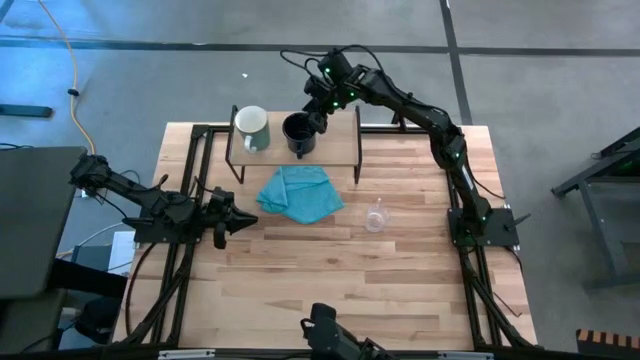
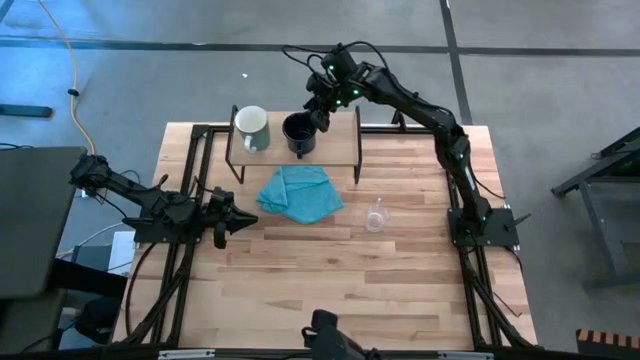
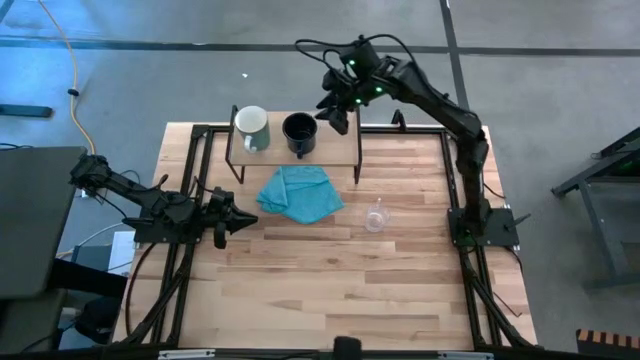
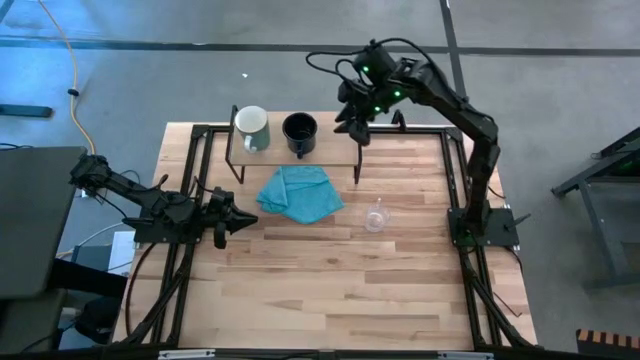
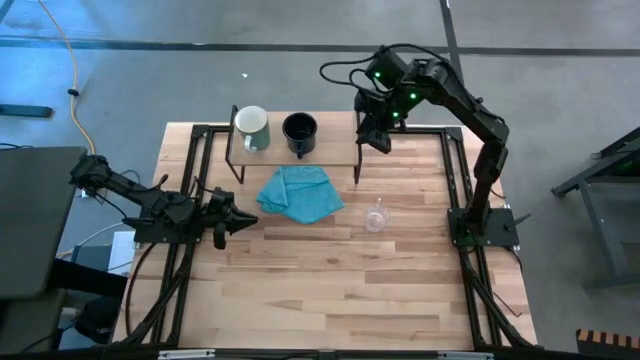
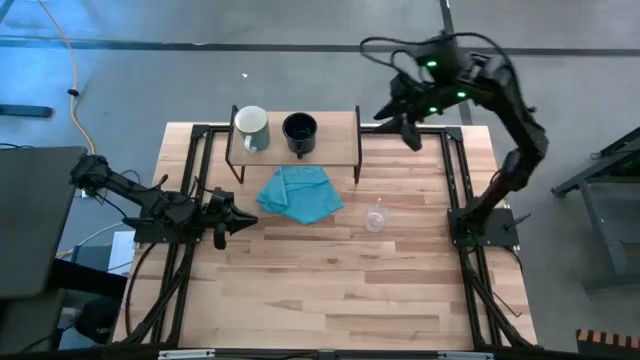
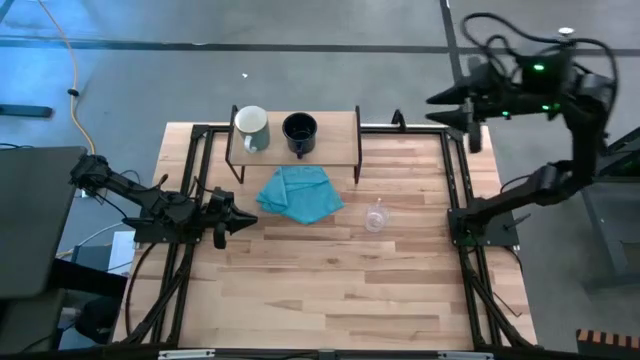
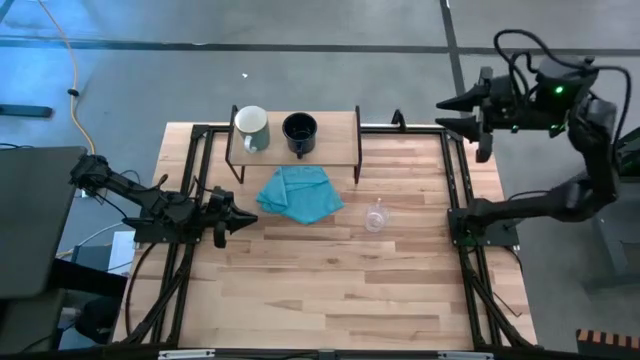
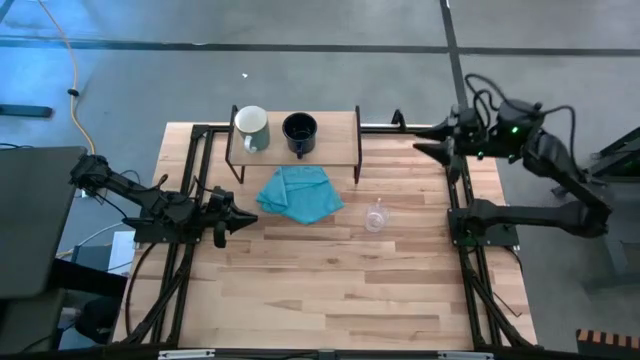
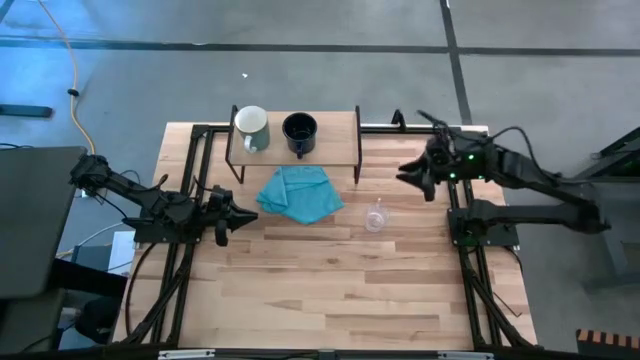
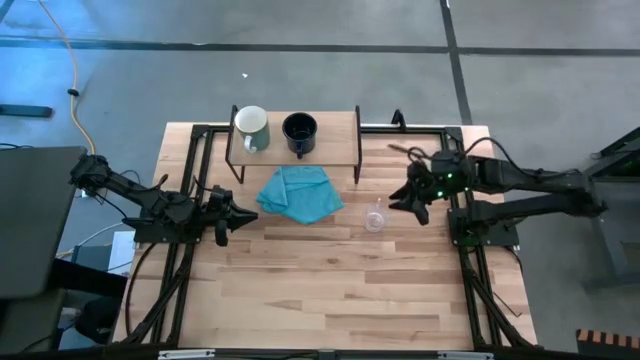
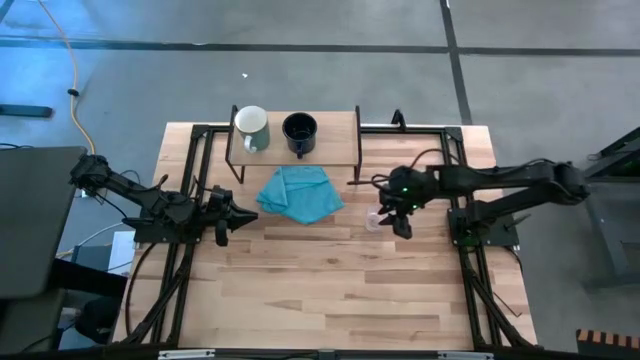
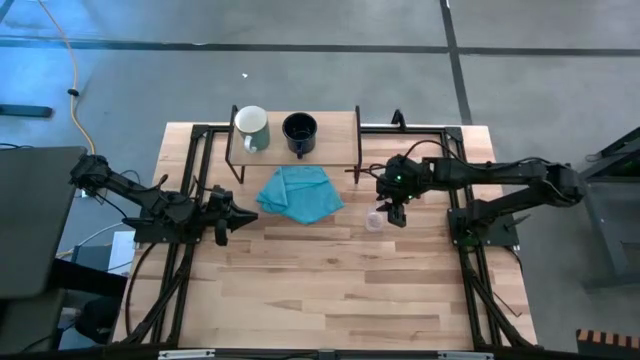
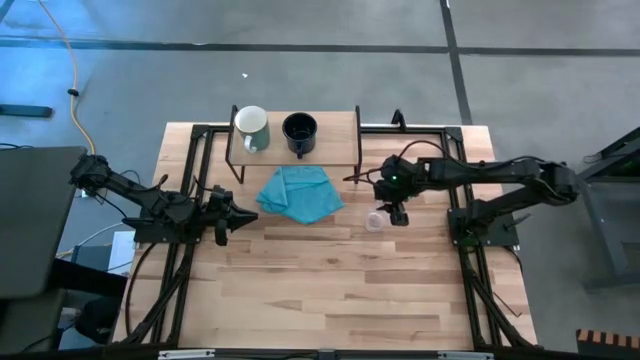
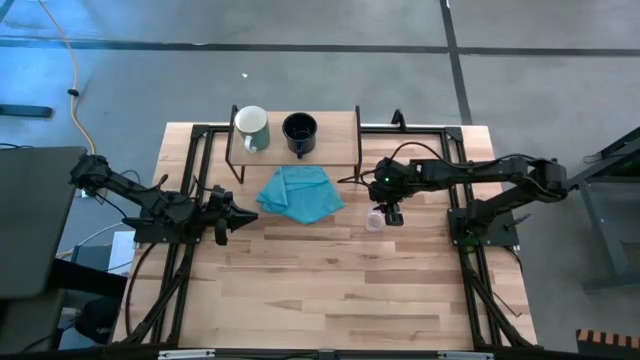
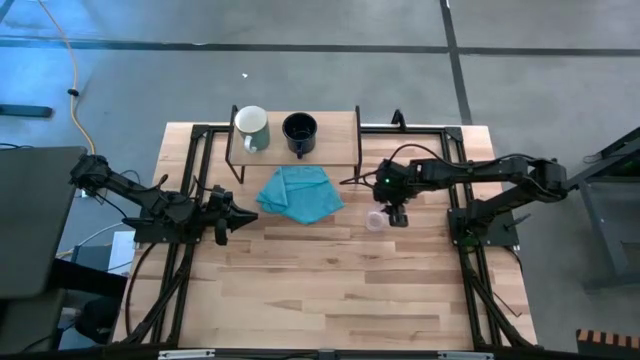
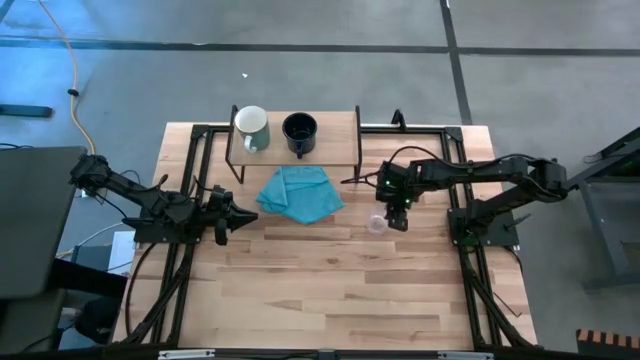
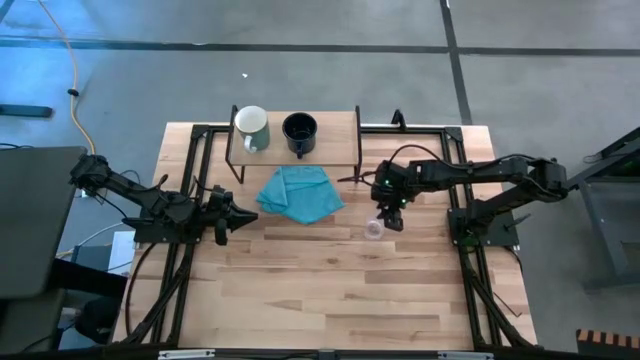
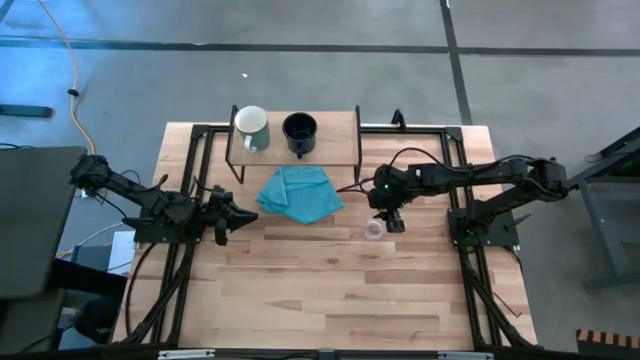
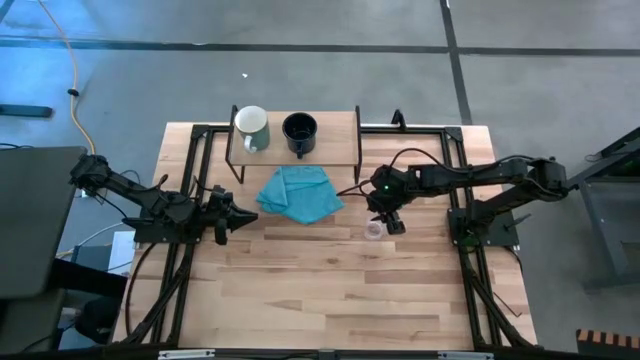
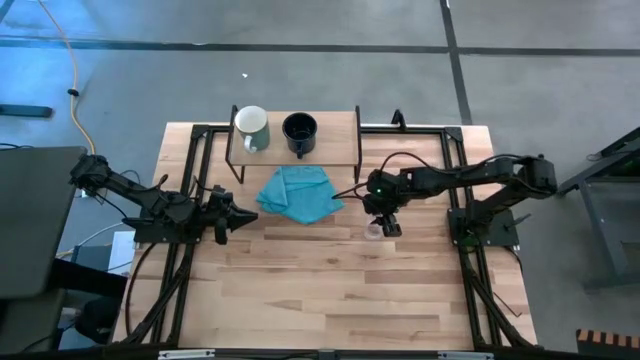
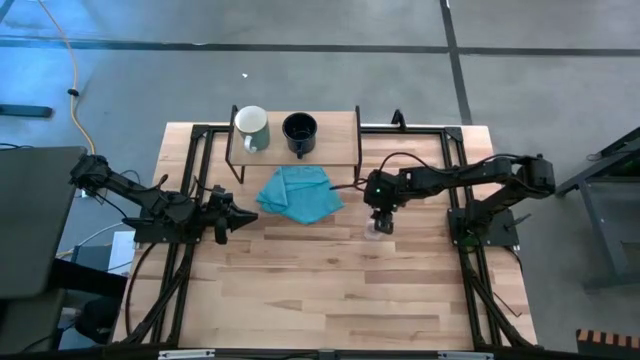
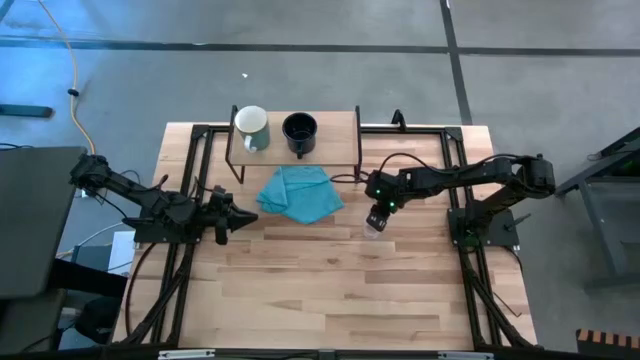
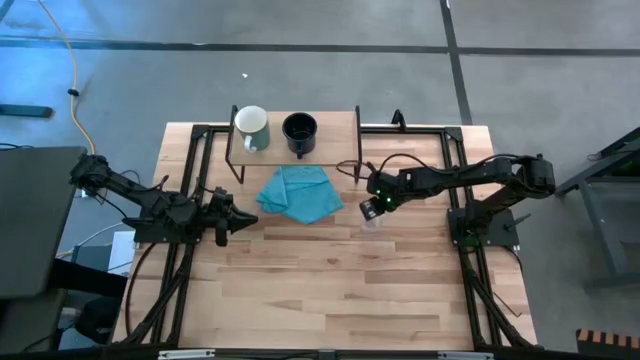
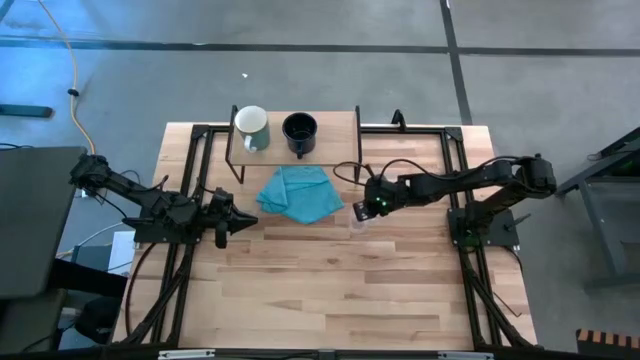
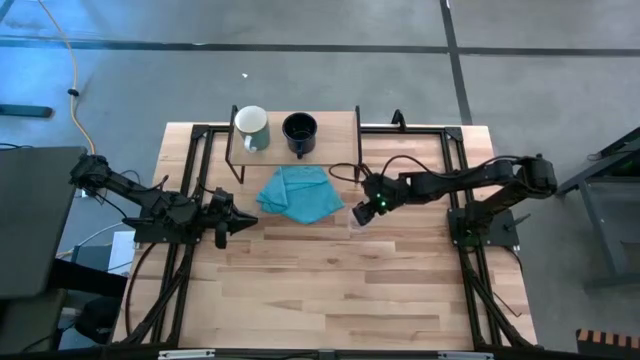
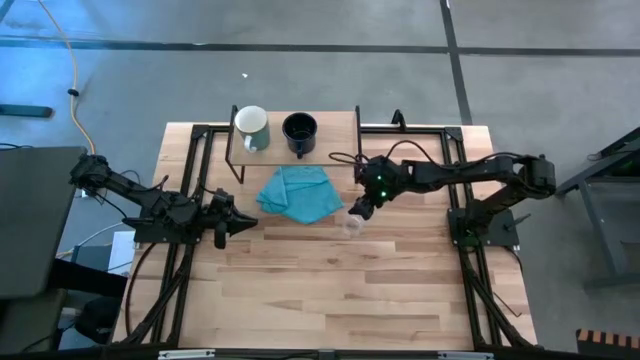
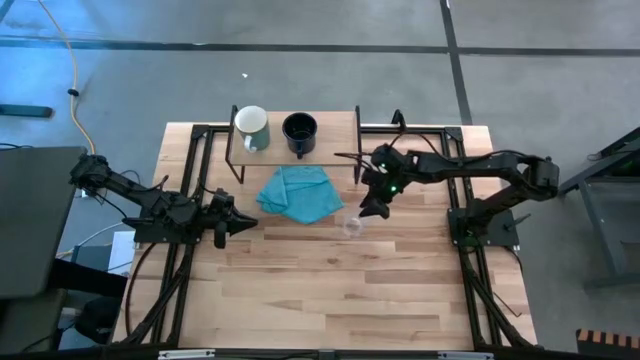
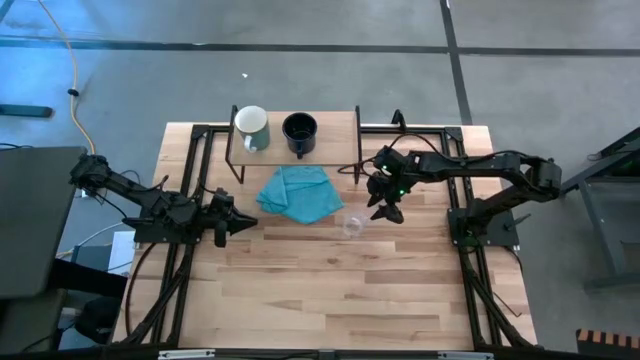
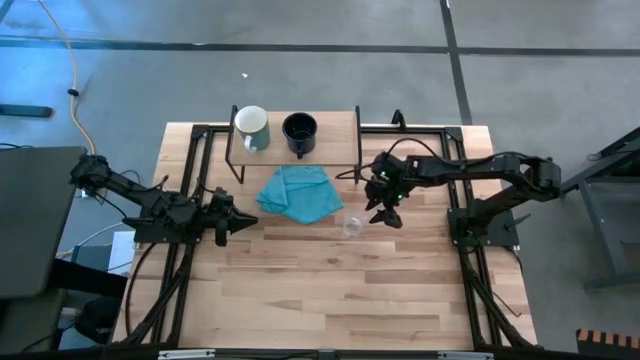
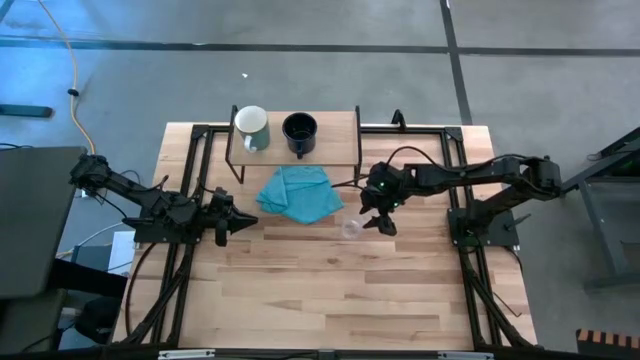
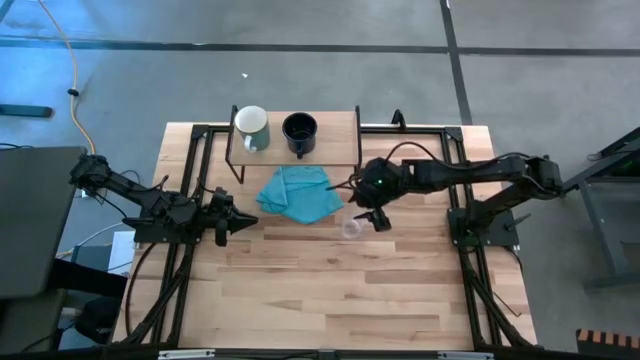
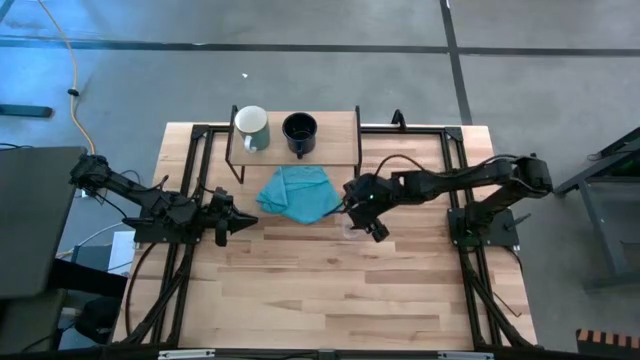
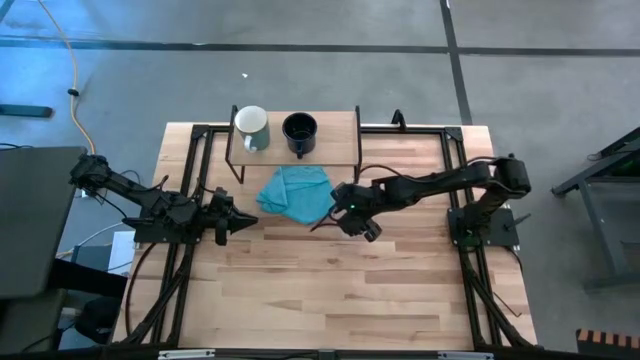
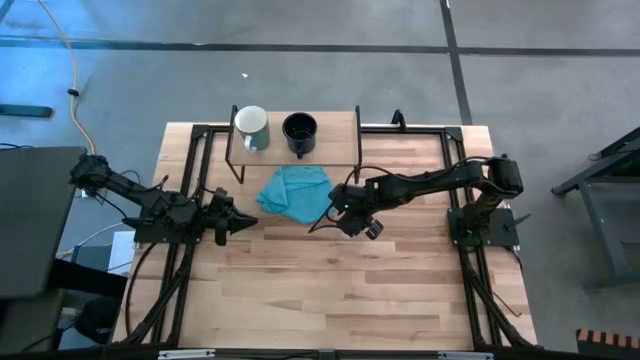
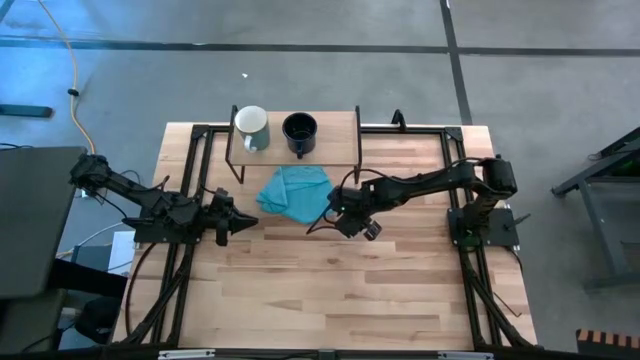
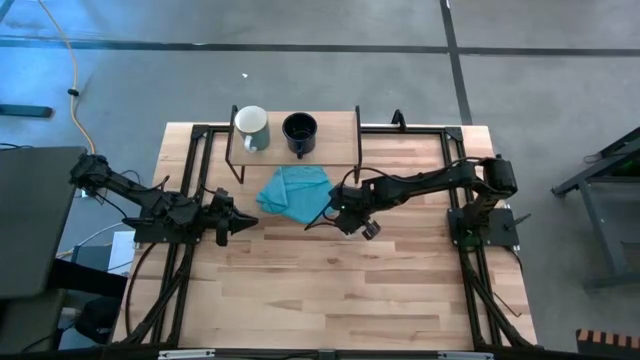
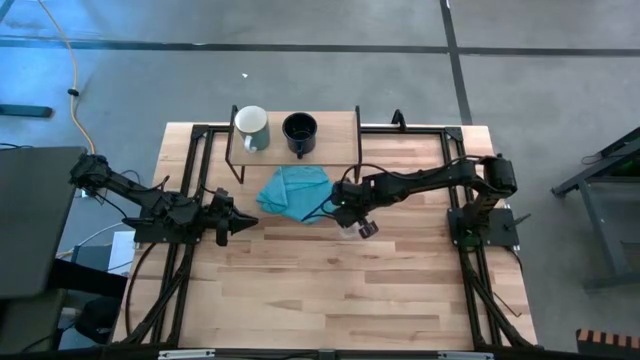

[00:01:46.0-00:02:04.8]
Task: Stack small to large cups/mugs on shelf
Put the transparent mug on the shelf

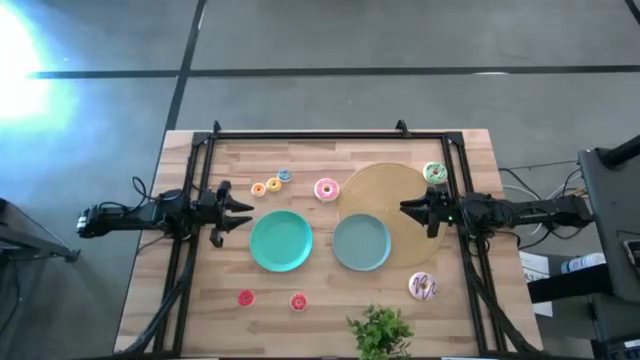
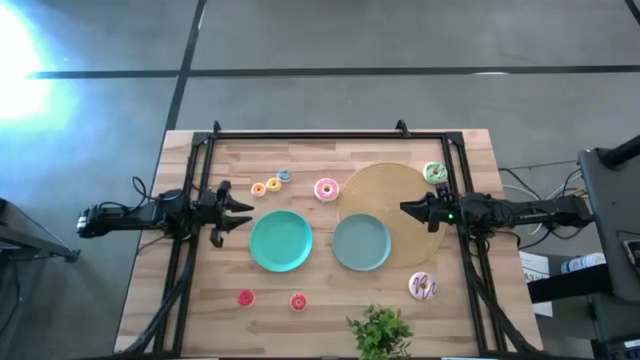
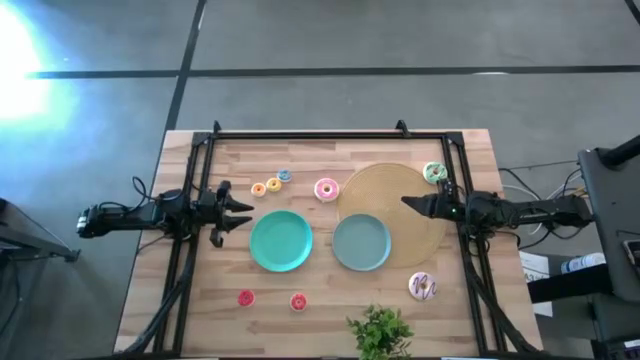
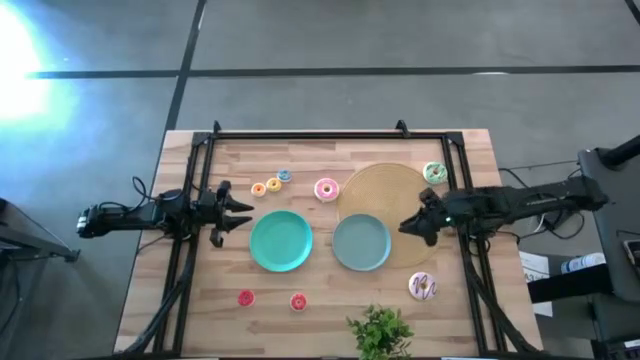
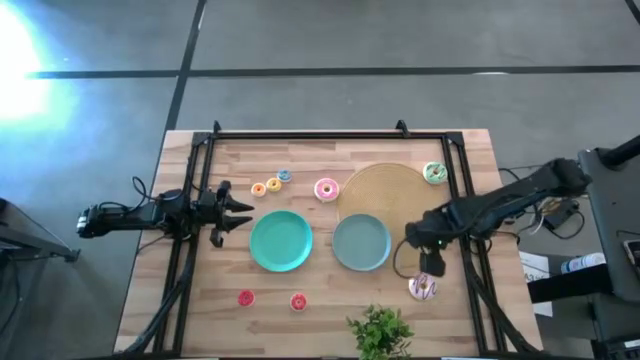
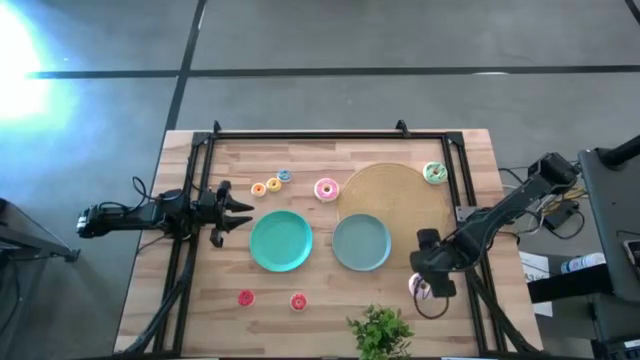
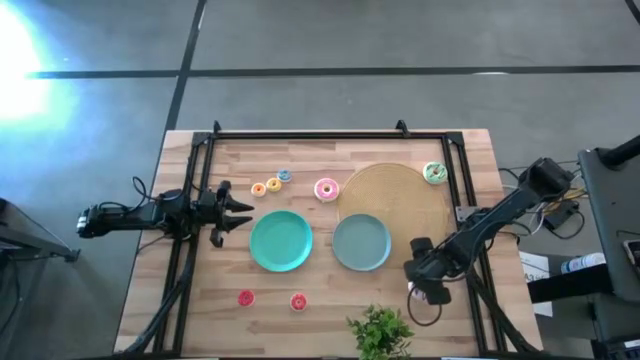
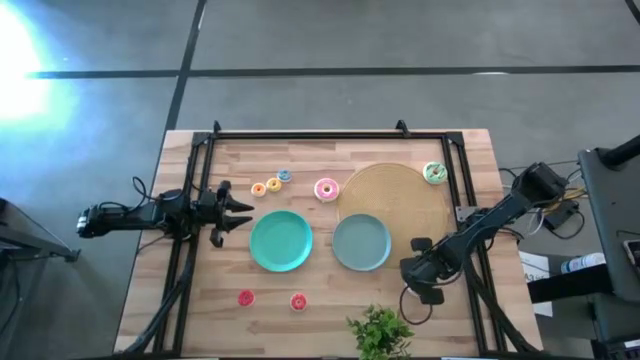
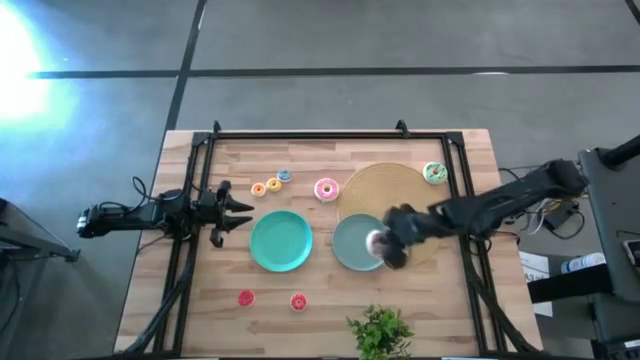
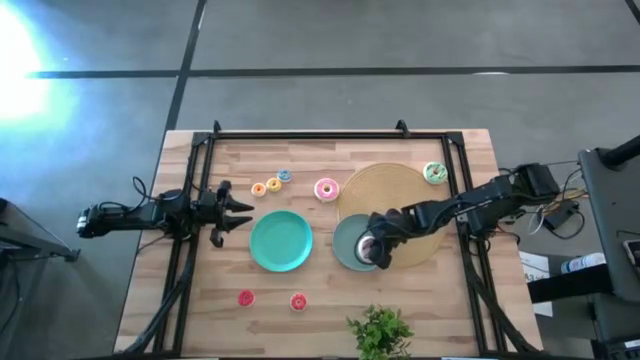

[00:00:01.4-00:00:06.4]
Task: Pick & Place donuts
Put the big purple donut on the light blue plate
